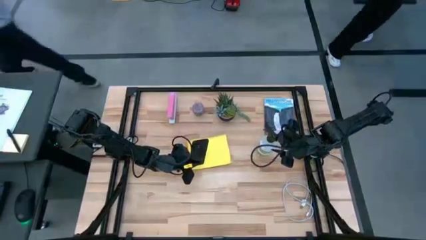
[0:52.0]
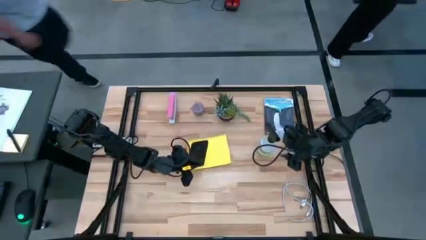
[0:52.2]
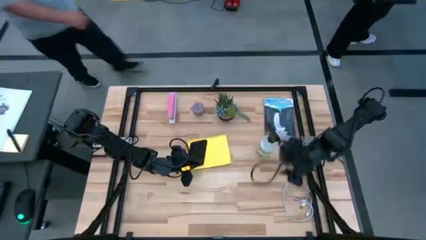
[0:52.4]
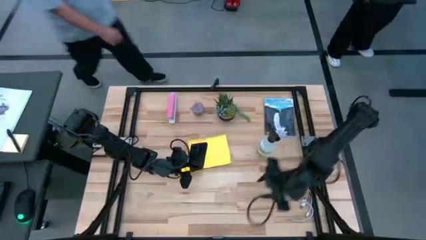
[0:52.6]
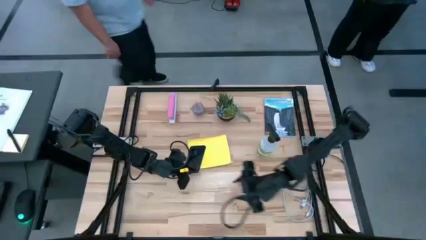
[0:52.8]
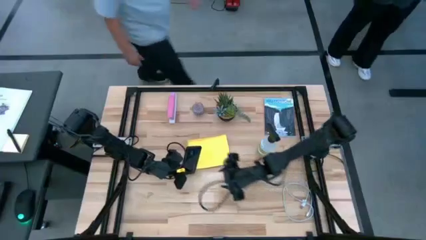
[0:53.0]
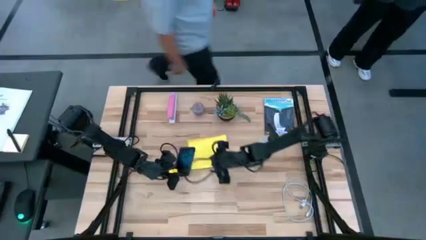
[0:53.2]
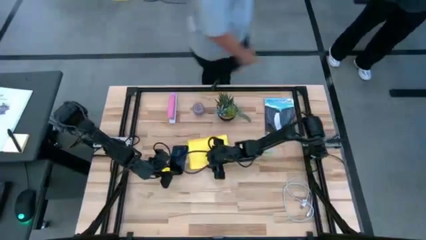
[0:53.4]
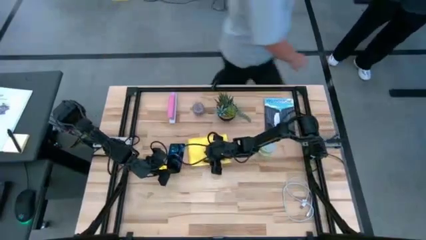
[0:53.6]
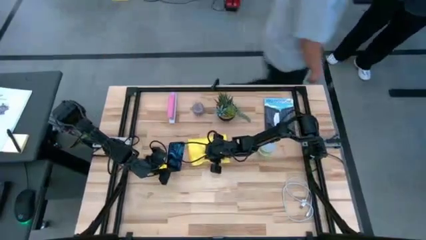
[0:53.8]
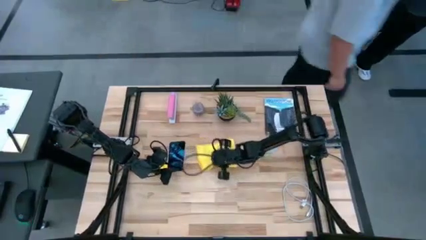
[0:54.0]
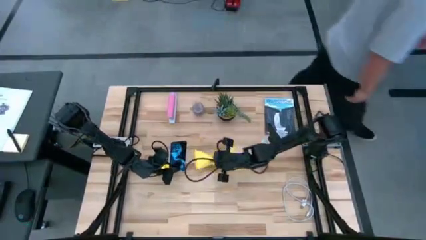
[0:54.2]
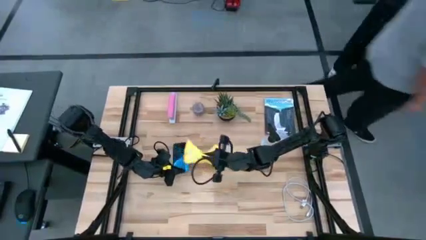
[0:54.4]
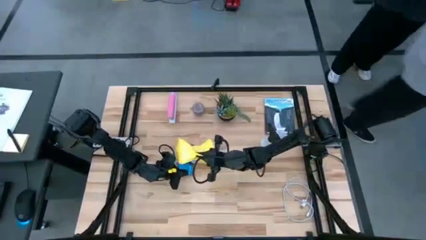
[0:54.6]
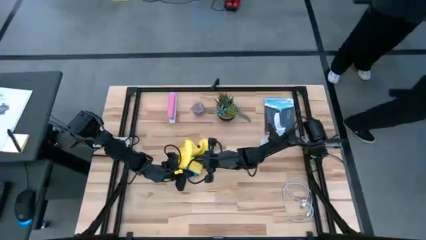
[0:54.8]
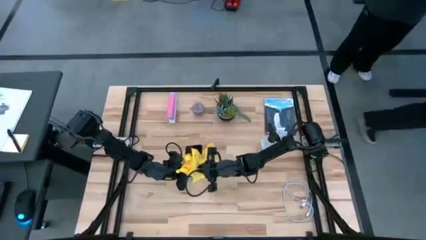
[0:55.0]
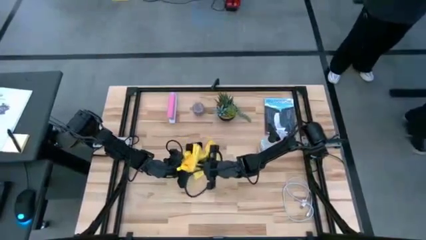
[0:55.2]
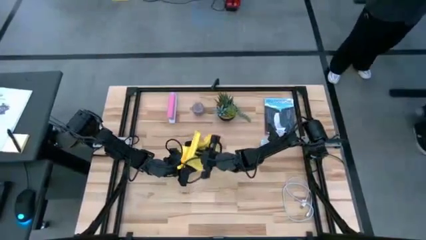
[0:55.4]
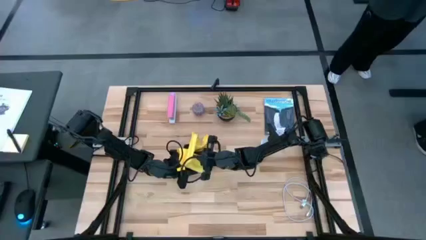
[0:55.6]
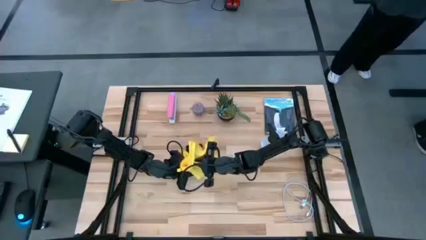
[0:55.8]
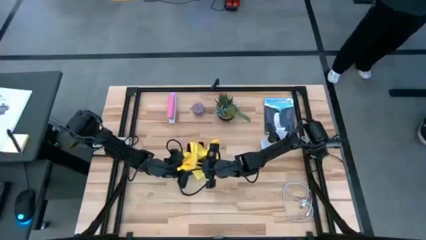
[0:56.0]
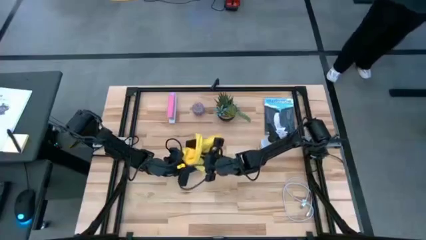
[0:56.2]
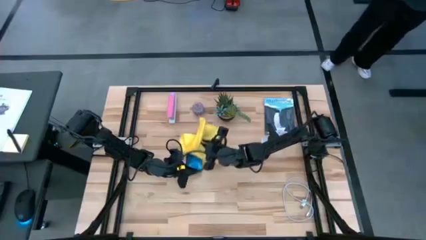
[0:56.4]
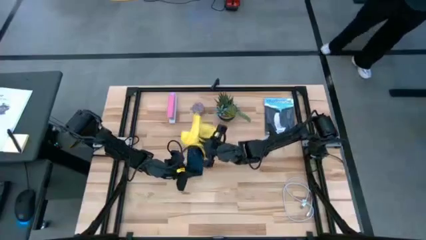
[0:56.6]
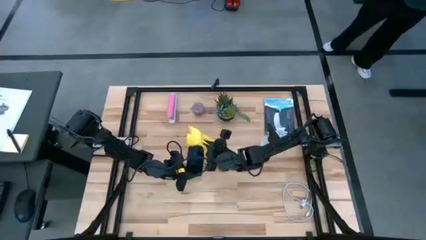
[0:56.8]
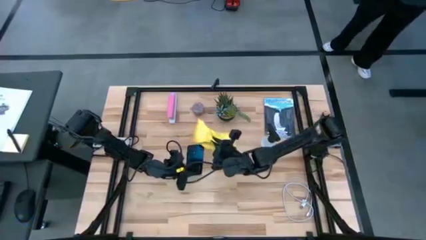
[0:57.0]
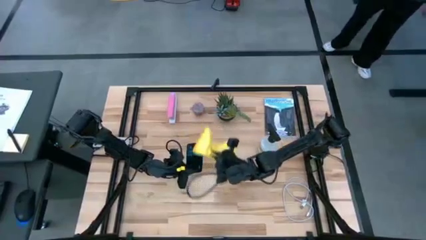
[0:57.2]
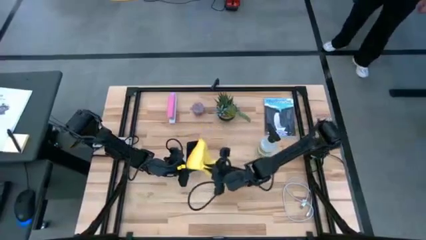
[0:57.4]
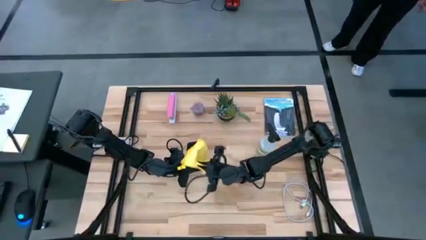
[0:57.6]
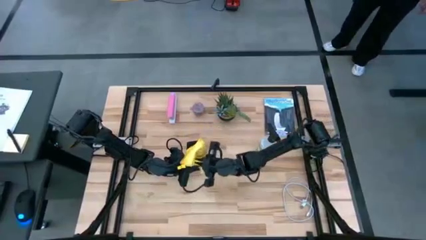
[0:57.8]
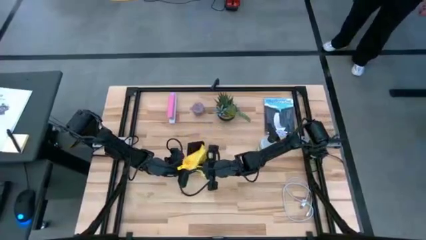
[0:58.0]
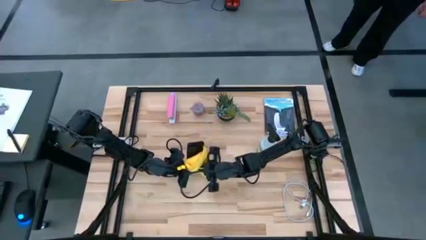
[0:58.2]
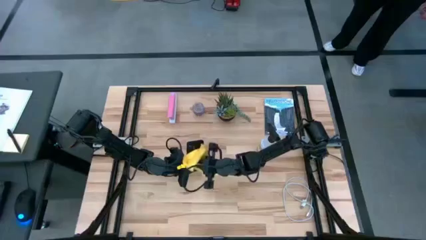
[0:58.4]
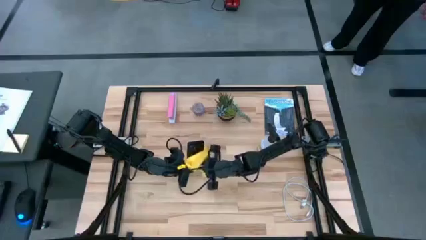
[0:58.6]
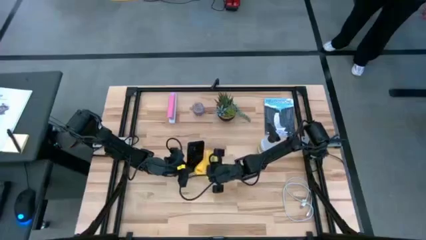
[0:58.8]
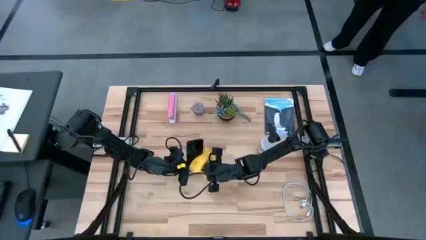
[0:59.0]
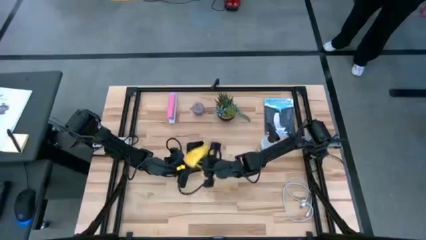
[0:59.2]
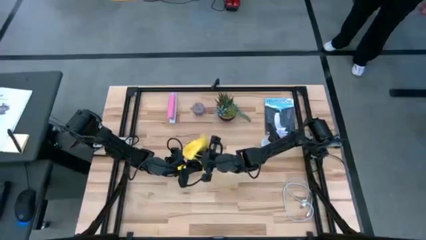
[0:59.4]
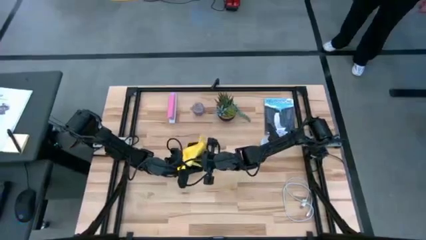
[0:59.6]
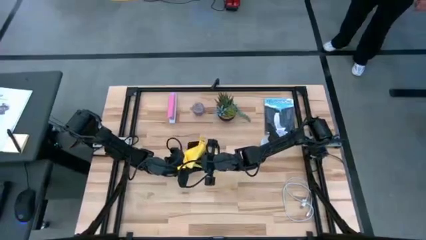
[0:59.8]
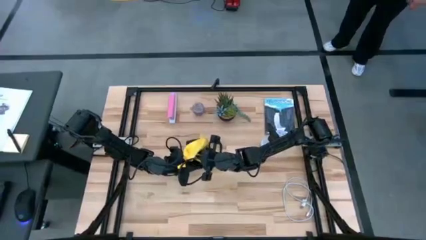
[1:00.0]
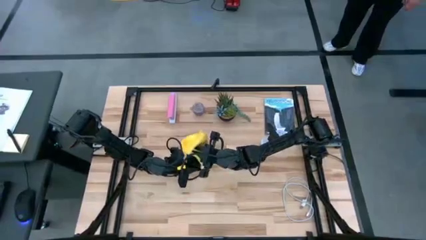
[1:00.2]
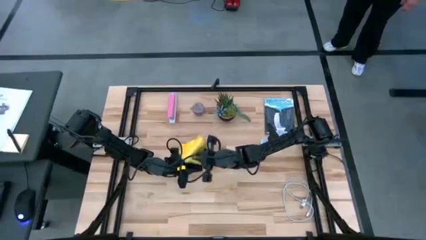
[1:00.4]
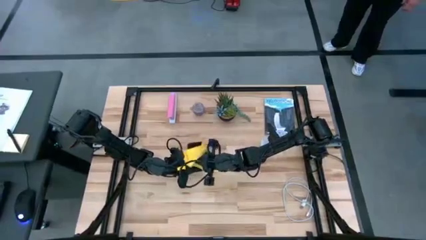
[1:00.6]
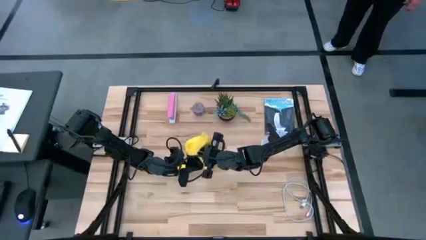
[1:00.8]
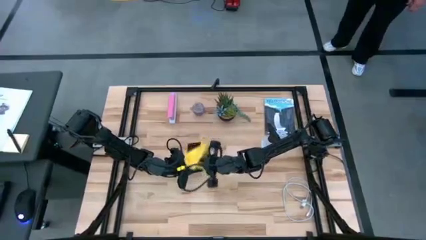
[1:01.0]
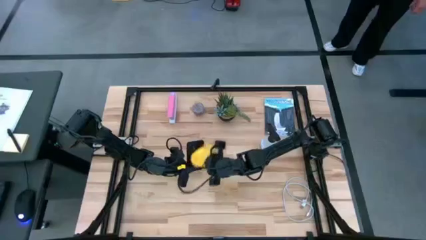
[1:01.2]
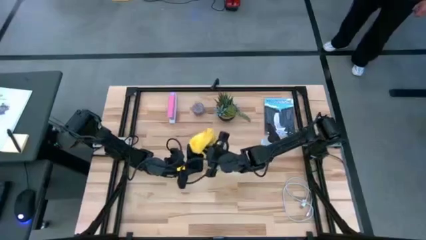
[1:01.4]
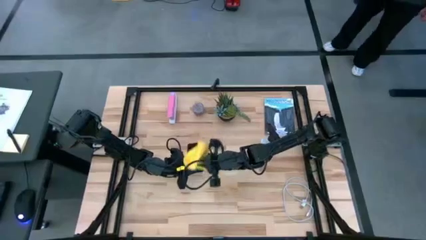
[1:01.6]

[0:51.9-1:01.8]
Task: Apply microfiber cloth
Wipe the back of the cellphone with the yellow microfiber cloth

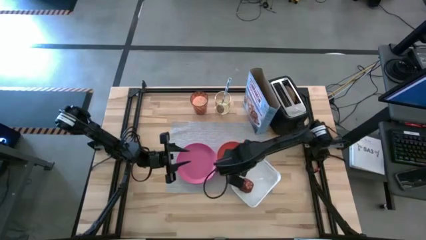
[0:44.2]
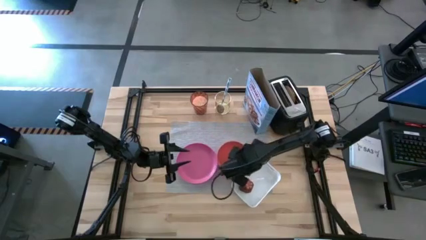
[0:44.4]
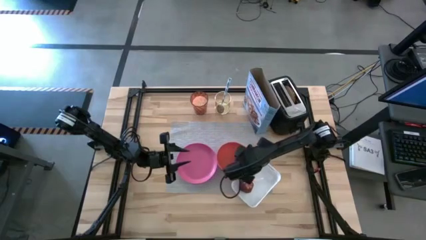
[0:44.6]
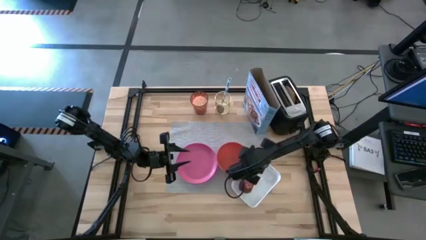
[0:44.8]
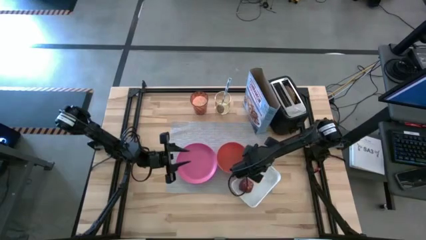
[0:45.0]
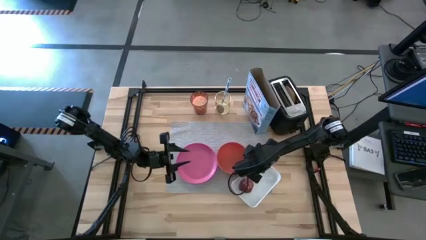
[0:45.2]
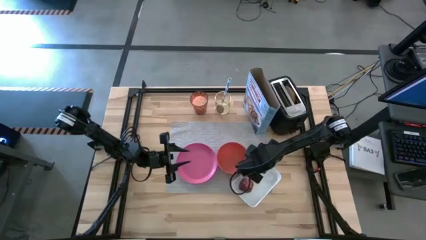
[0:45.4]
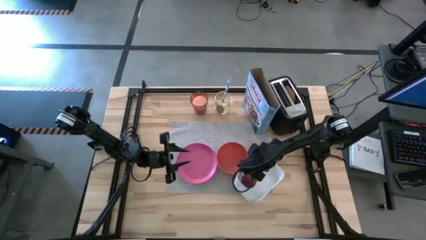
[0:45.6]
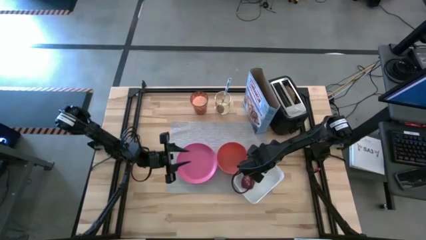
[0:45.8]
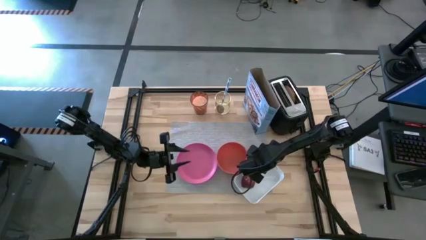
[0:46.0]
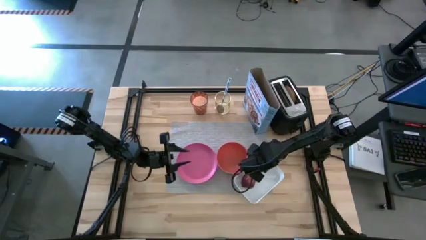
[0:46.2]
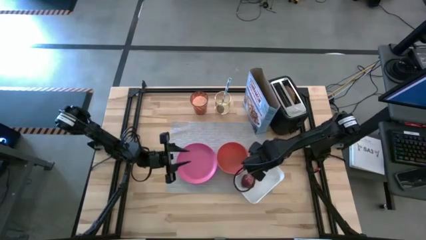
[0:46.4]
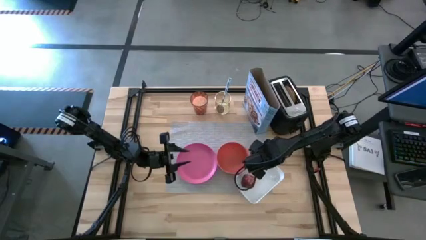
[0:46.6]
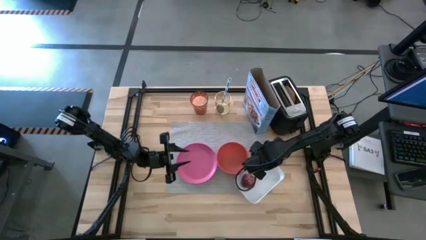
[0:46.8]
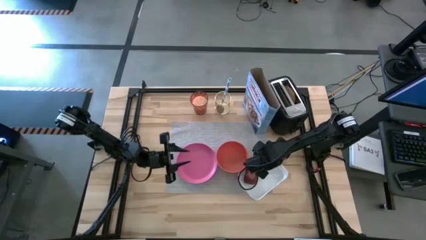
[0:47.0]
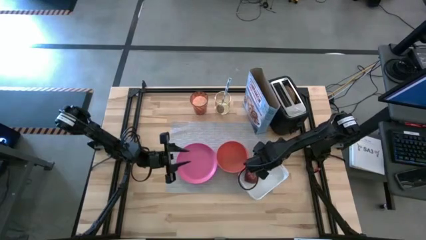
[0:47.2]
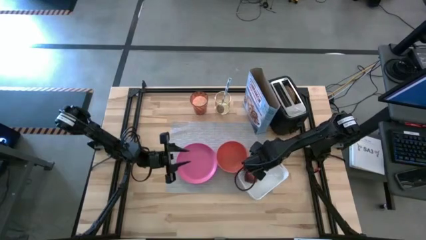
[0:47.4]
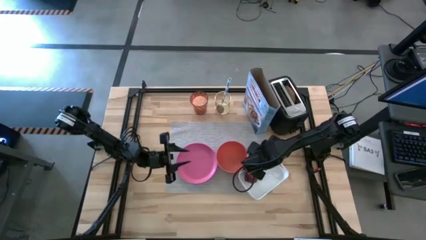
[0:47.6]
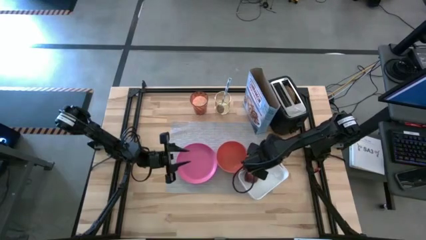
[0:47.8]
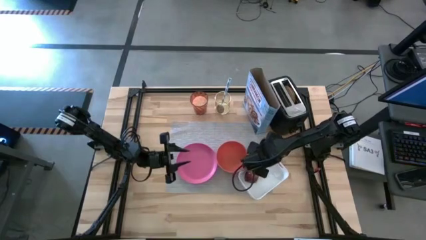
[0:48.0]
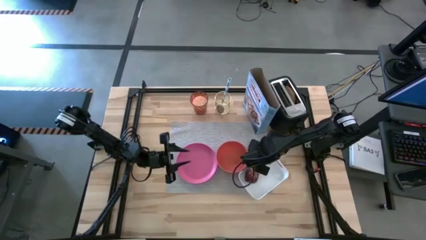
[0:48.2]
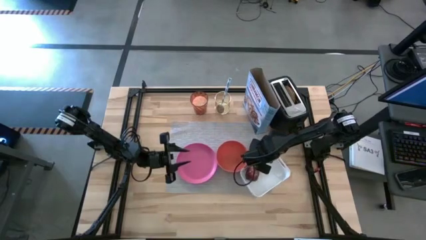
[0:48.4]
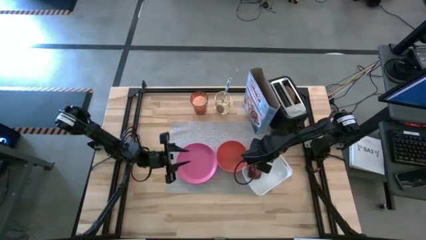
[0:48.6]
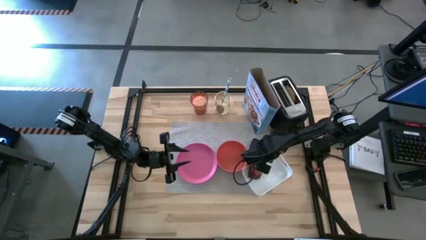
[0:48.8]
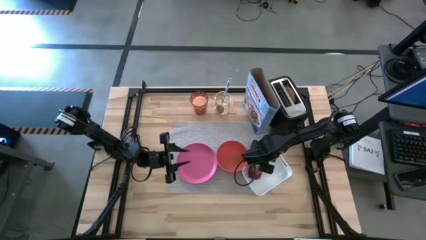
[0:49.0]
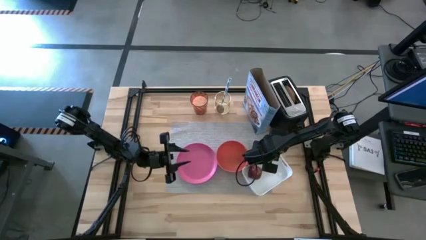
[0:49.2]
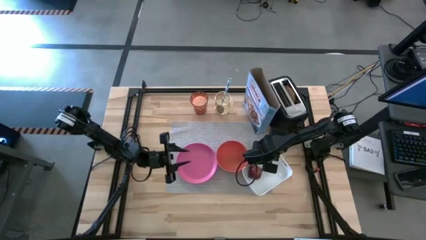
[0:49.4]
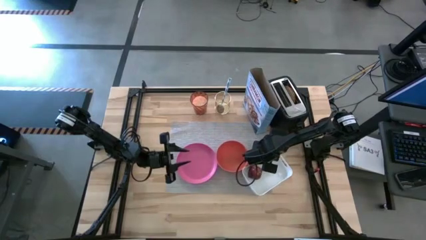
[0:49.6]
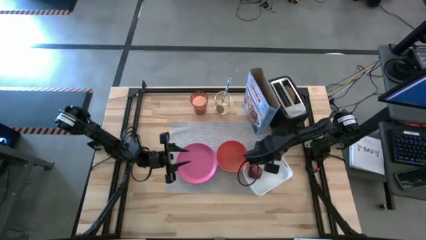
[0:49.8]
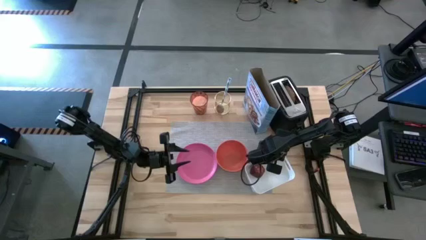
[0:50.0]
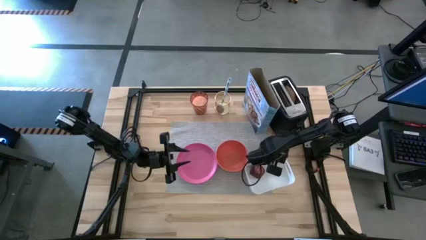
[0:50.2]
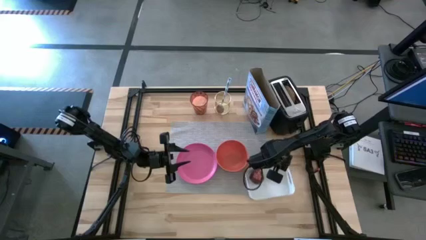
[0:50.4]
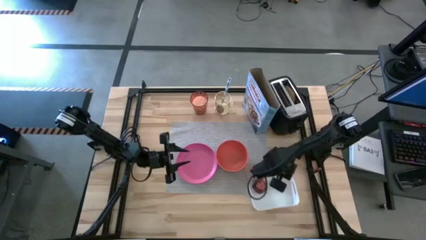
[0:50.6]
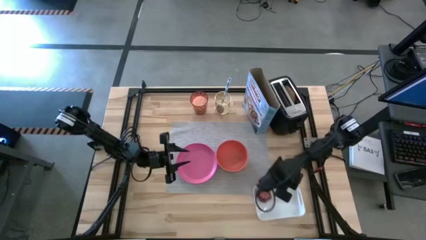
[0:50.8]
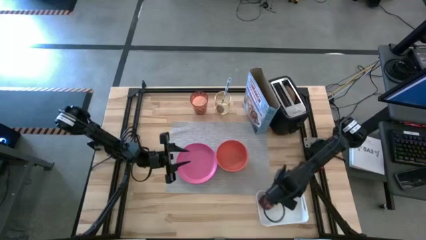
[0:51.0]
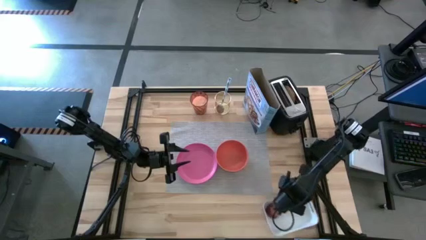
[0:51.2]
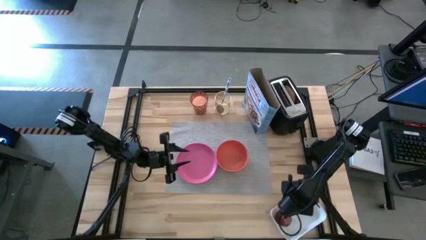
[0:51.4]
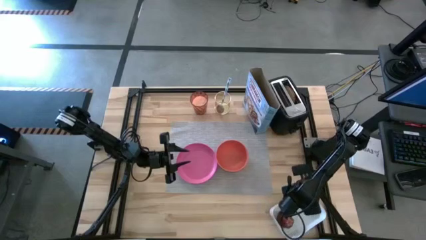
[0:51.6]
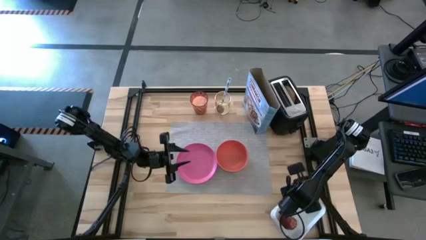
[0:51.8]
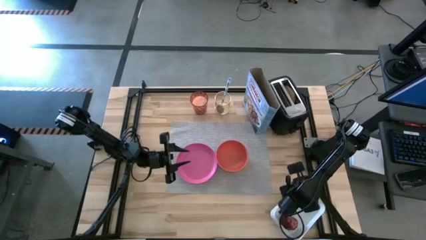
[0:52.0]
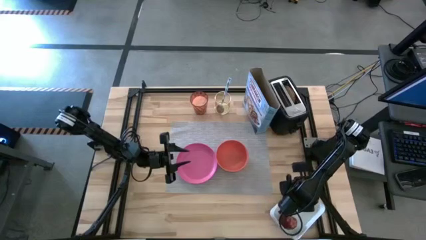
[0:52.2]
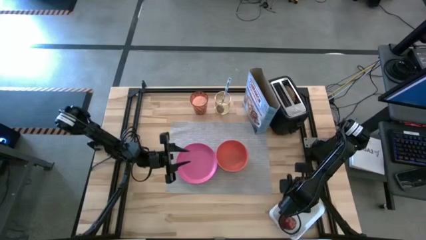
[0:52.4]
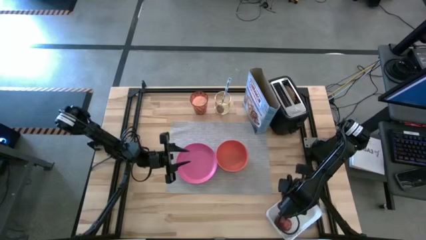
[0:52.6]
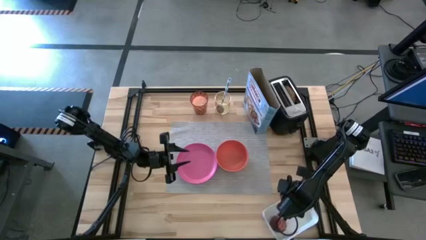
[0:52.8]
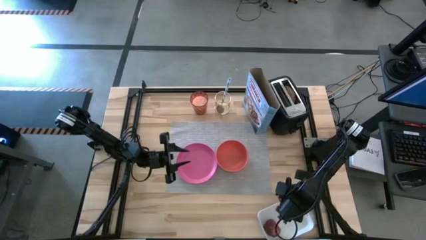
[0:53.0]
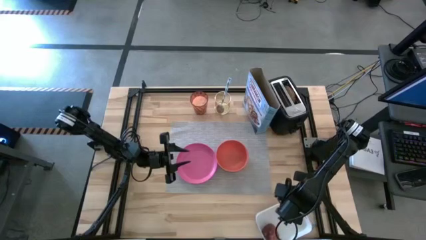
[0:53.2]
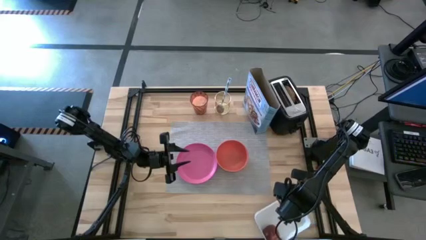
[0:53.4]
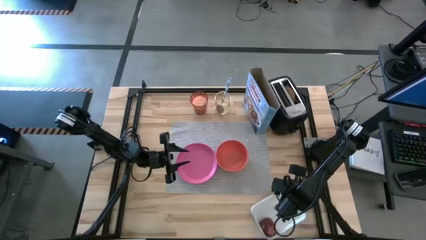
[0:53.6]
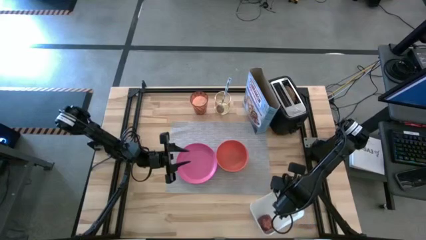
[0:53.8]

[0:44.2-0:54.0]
Task: Arrange a breakfast setting
Move the white bin to the bottom right of the table
